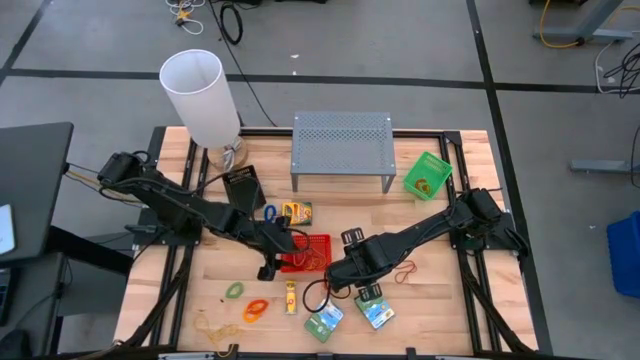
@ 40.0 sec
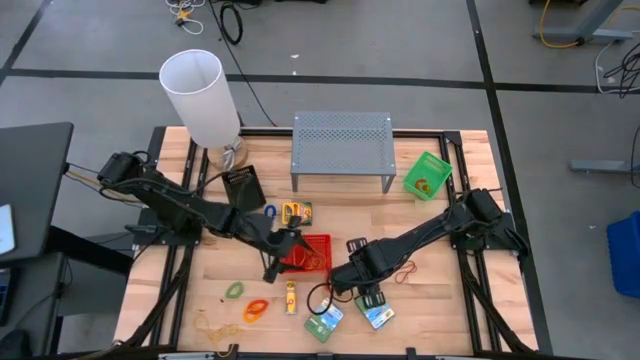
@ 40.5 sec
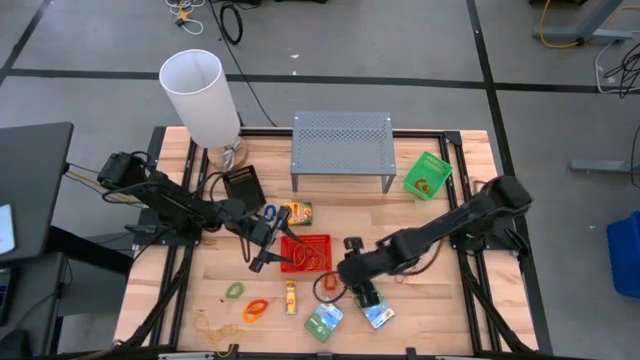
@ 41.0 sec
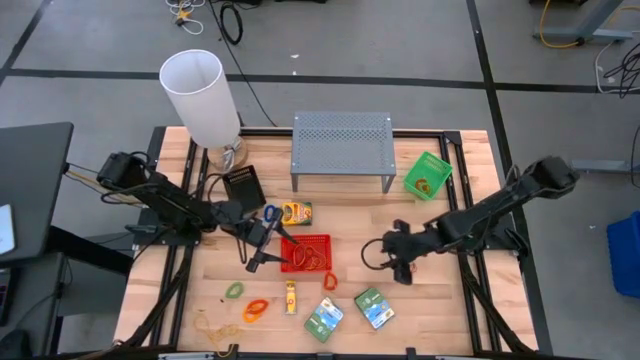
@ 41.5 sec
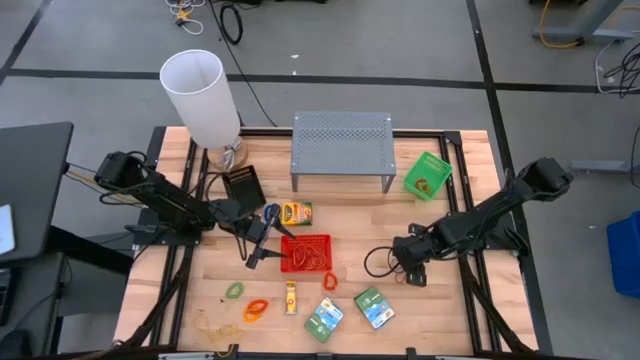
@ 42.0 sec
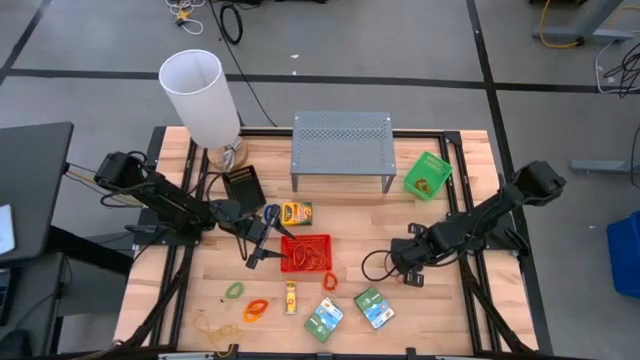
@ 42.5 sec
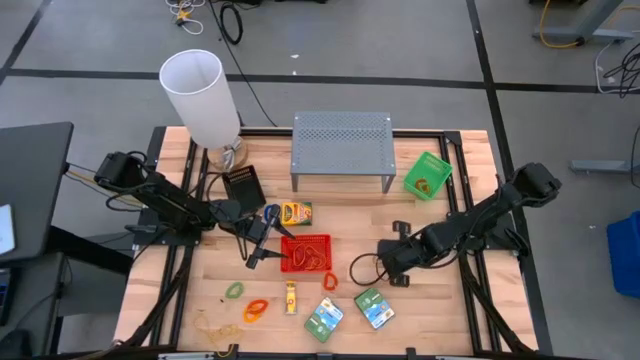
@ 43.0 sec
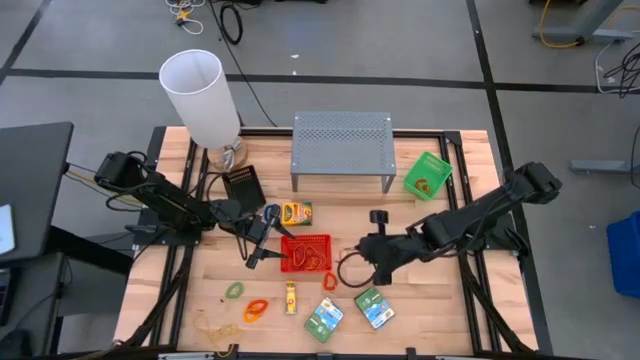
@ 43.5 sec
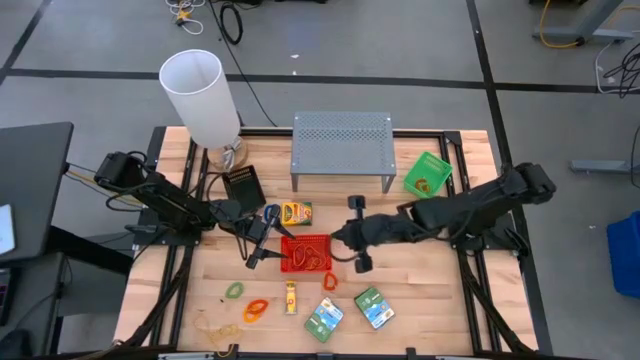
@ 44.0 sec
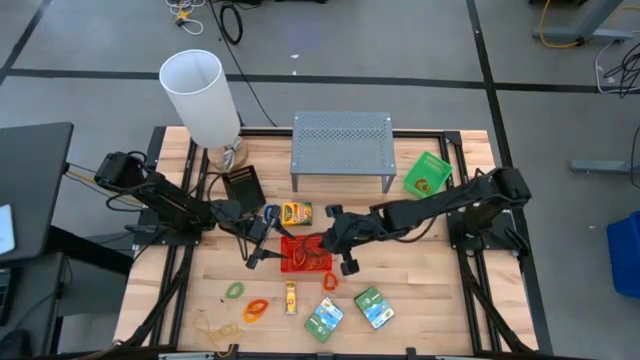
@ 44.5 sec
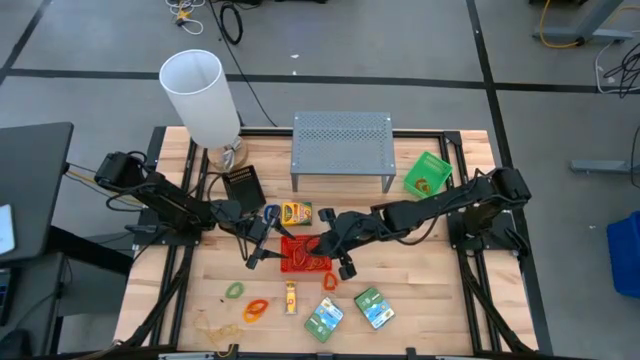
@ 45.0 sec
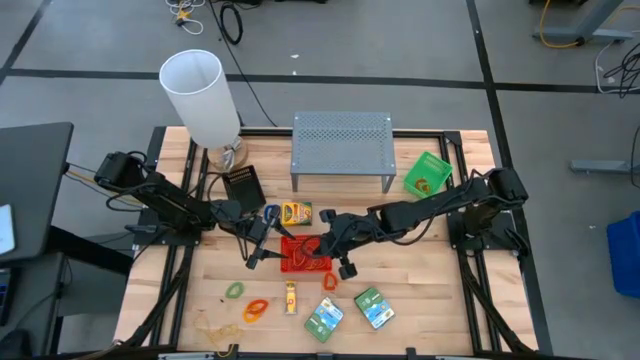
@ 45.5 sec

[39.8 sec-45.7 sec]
Task: Pick & Place Office Desk Supplies
Put the red rubber band into the red bin

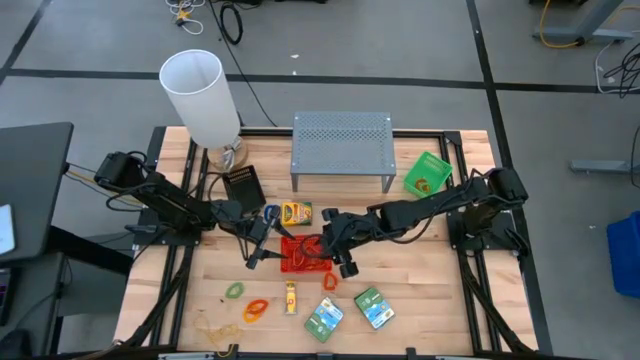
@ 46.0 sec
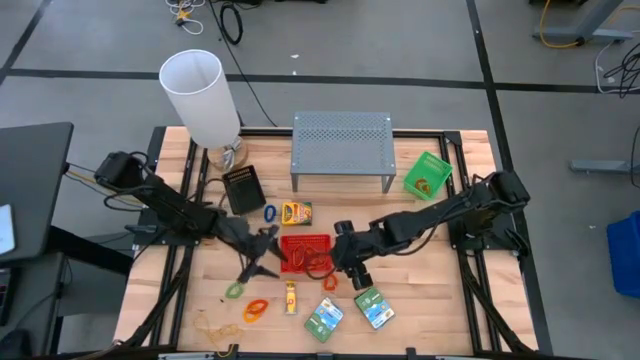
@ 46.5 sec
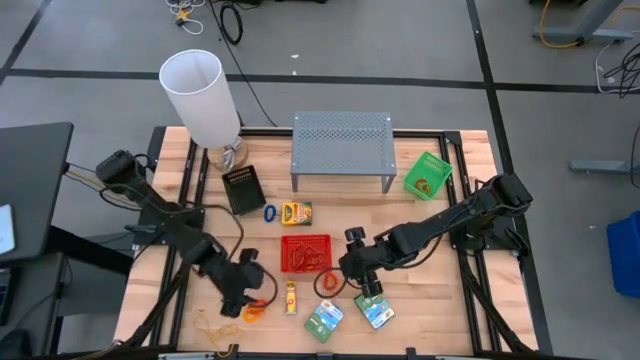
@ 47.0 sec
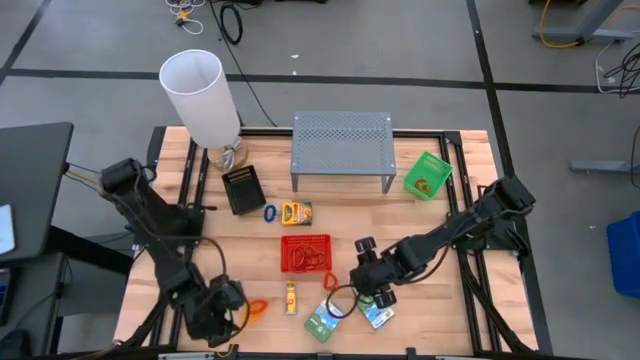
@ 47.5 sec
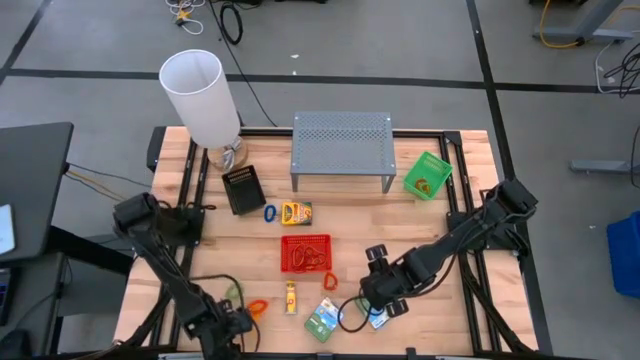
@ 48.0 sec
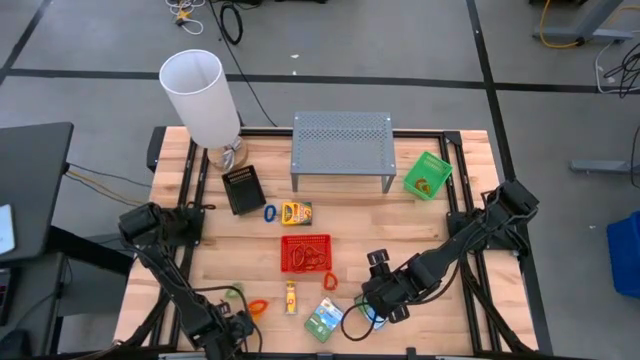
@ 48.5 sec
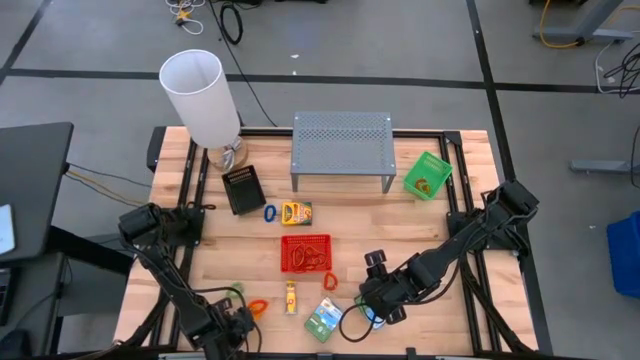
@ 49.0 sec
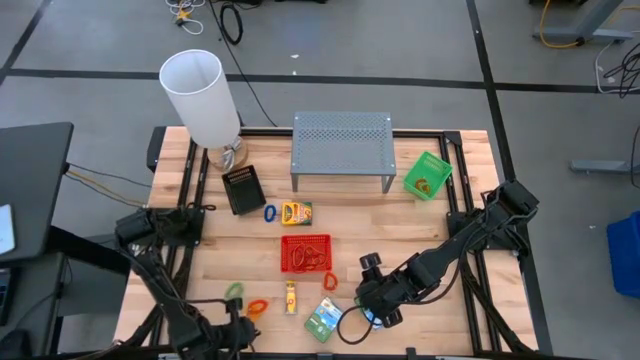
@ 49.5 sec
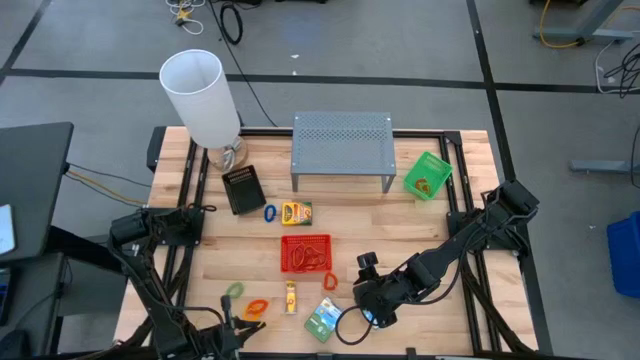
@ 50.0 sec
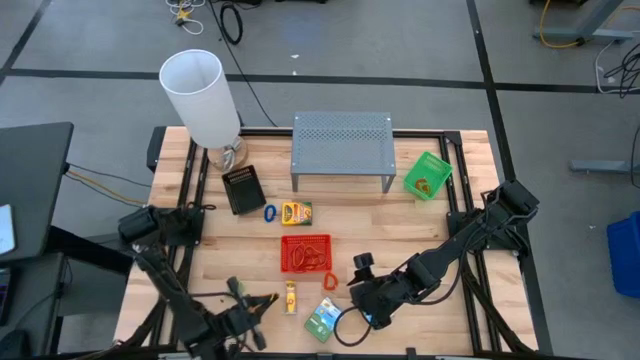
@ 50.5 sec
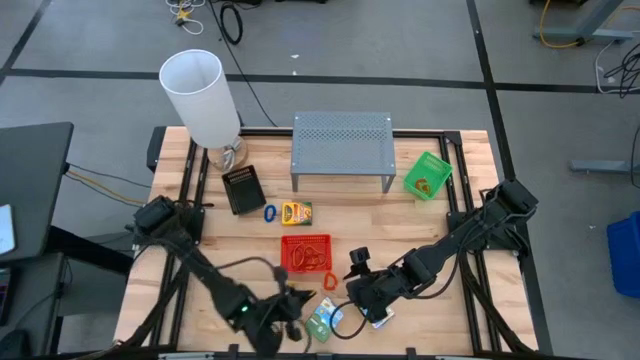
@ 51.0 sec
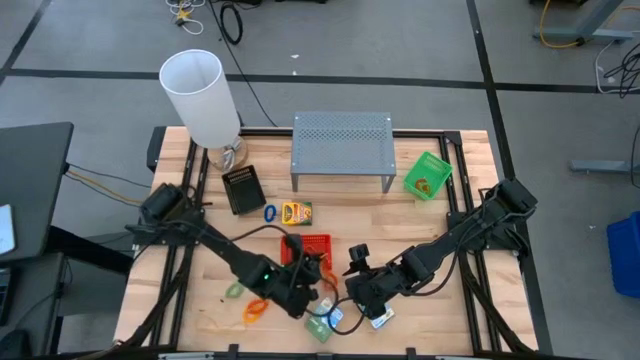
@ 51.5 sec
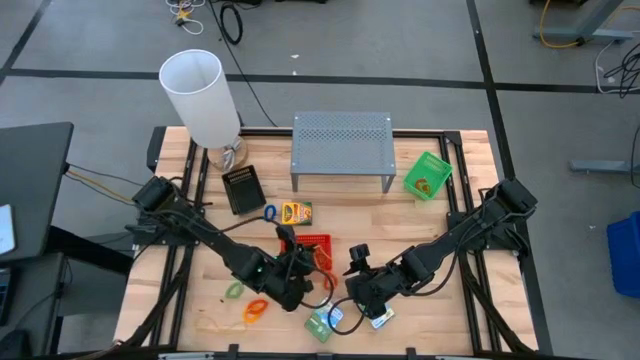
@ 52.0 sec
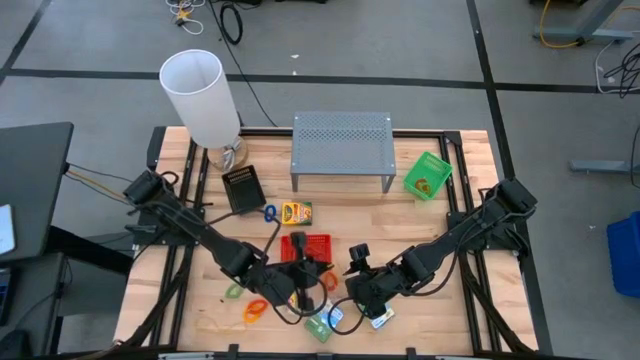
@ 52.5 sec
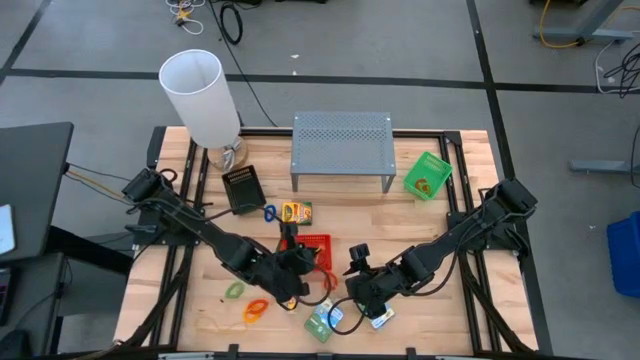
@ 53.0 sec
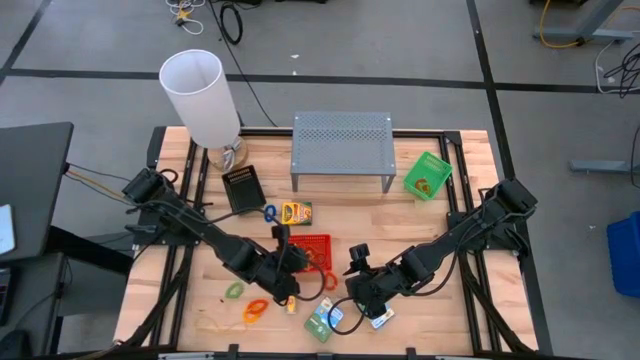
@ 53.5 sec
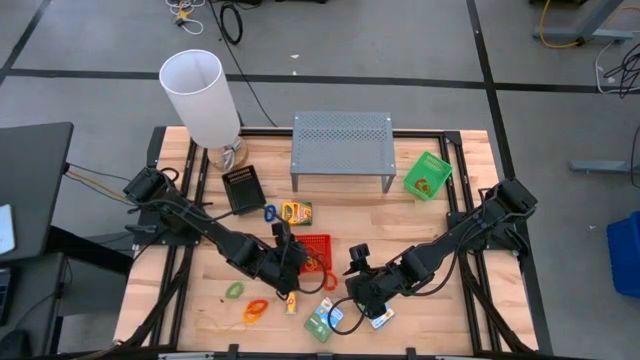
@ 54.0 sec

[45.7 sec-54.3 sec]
Put the yellow rubber band into the red bin

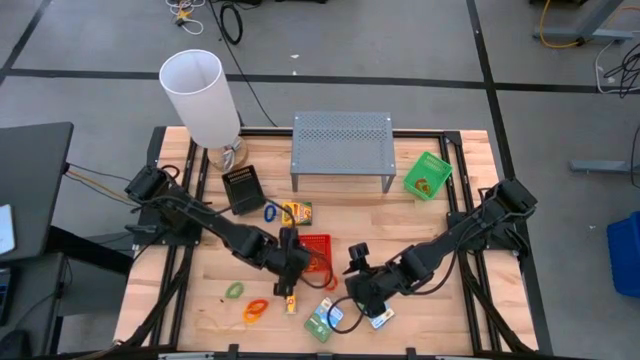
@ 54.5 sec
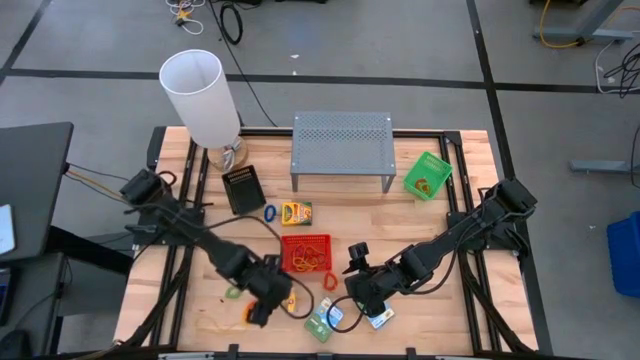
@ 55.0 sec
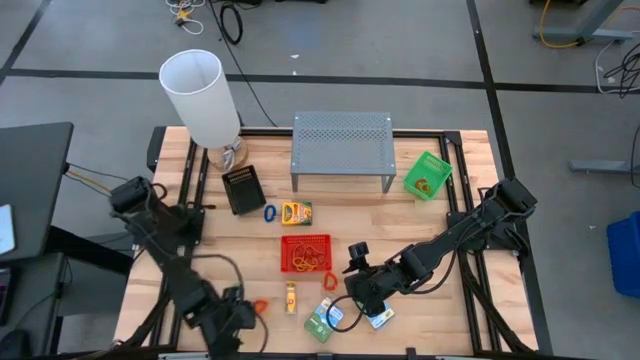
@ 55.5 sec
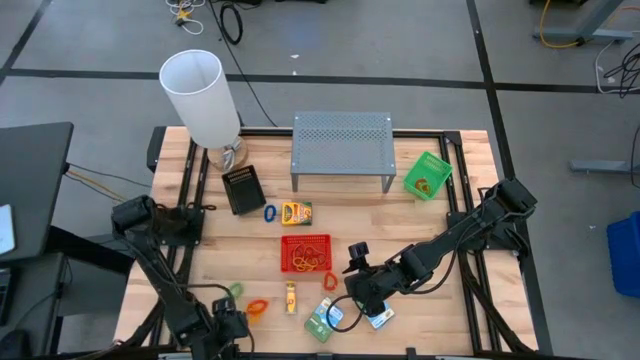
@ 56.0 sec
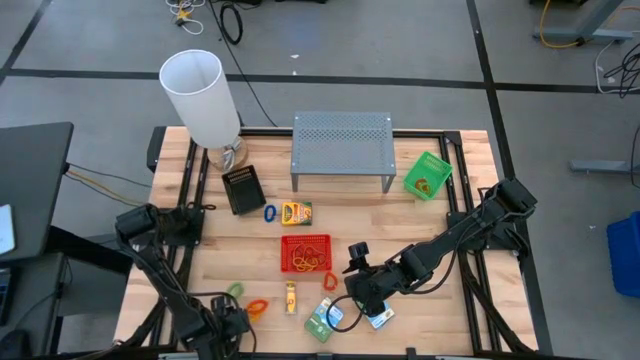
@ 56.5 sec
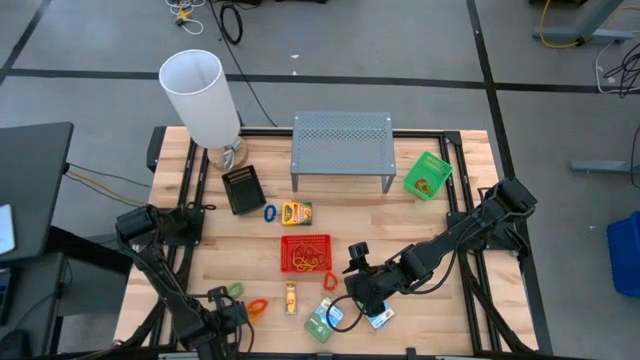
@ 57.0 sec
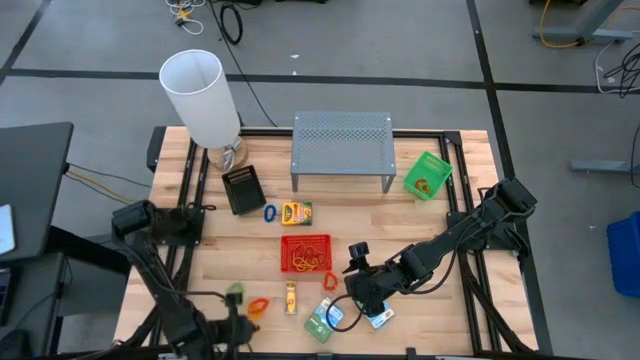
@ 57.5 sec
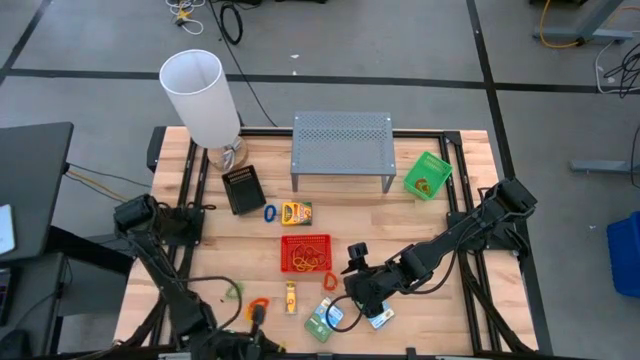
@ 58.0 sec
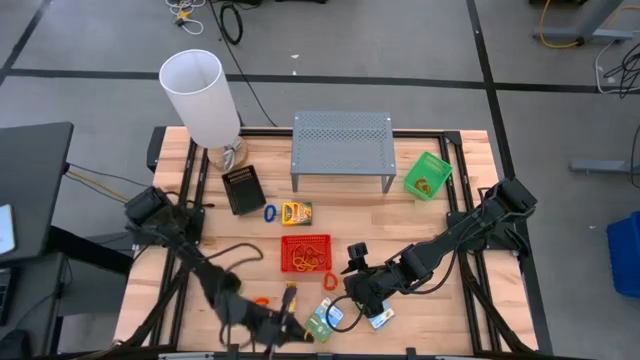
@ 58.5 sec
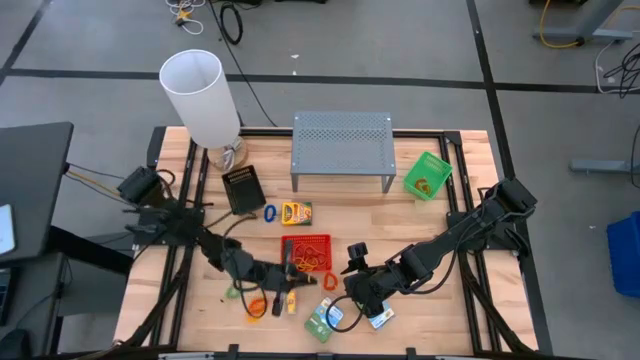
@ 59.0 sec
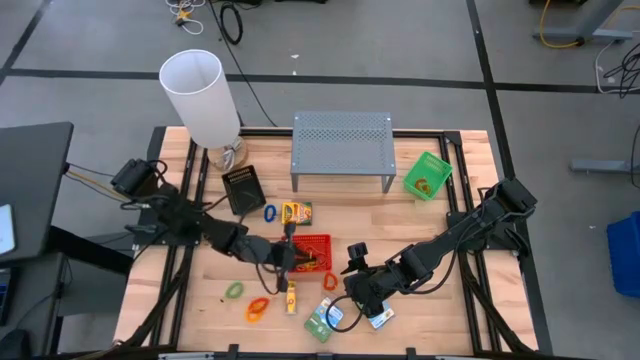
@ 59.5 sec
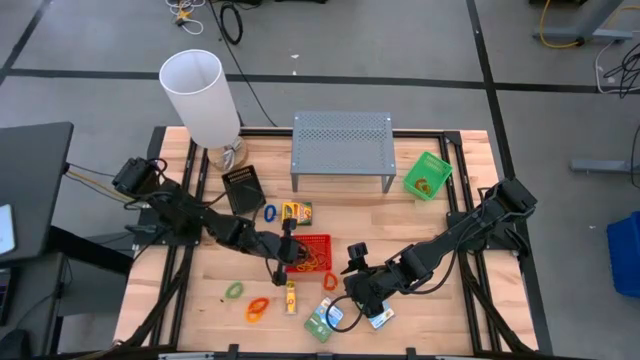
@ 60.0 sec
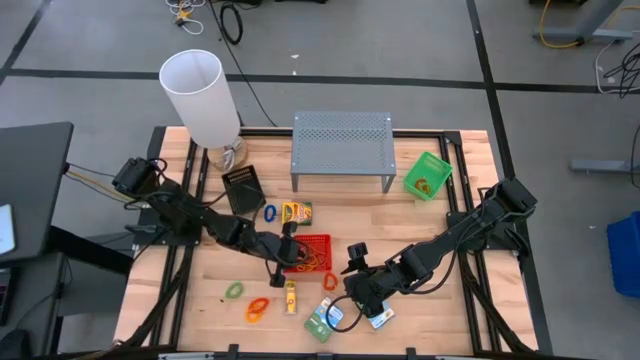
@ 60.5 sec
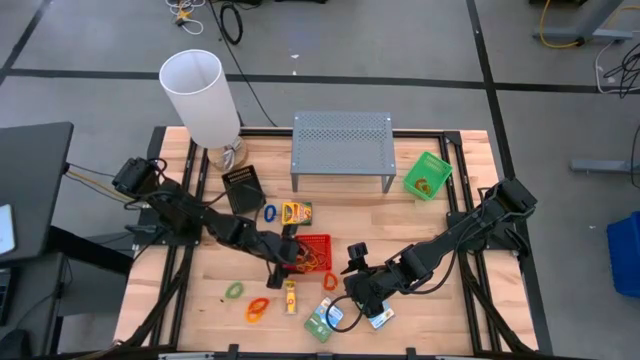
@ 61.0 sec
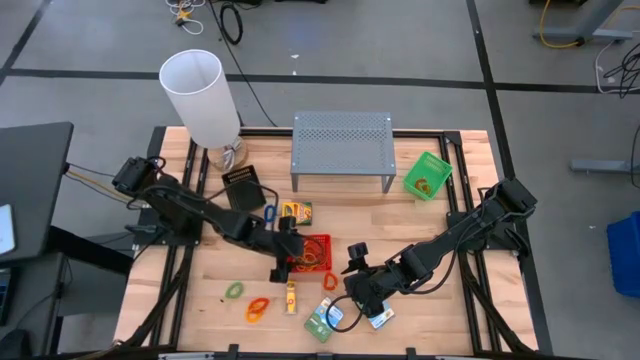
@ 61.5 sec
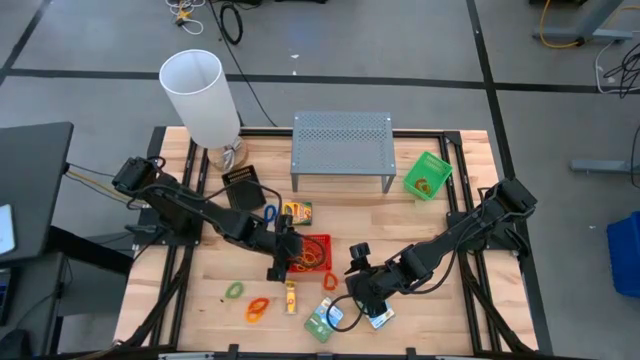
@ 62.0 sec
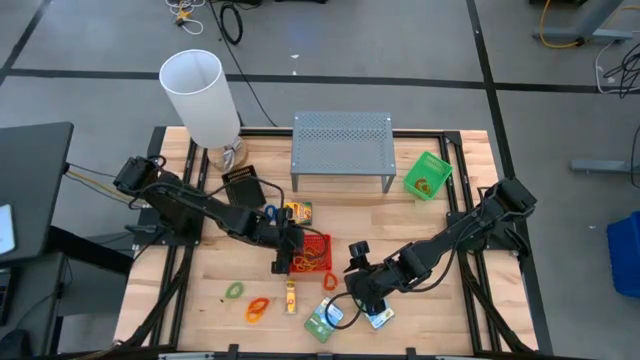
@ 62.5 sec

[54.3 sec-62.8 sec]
Put the yellow rubber band into the red bin
